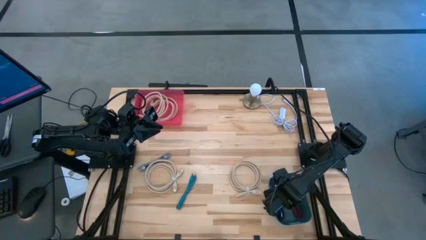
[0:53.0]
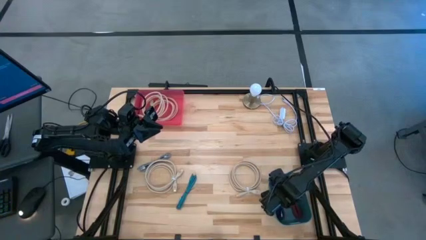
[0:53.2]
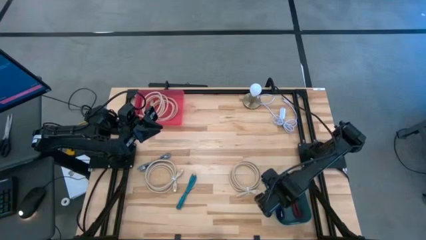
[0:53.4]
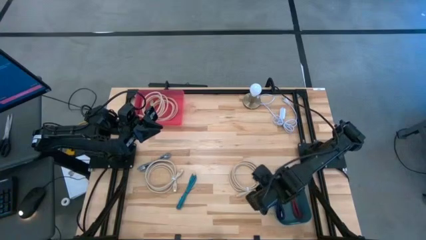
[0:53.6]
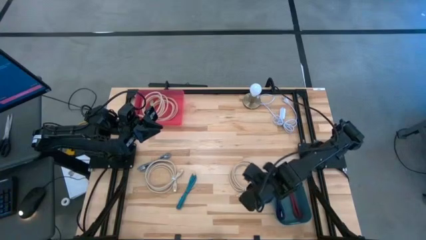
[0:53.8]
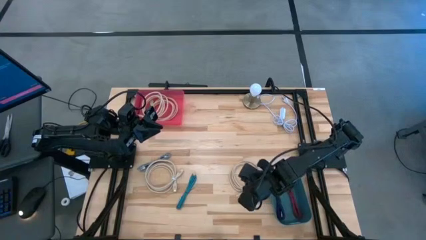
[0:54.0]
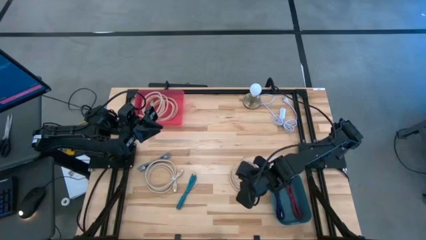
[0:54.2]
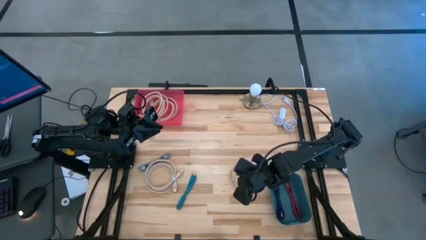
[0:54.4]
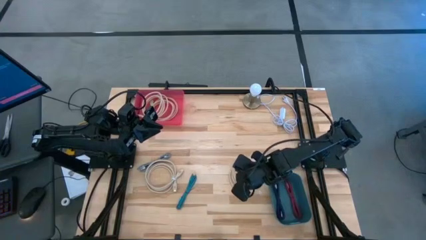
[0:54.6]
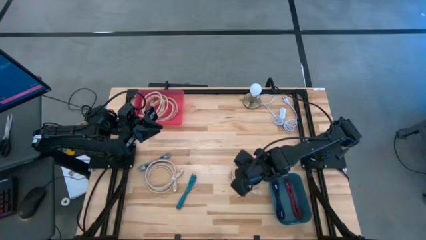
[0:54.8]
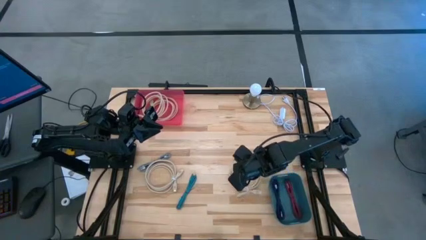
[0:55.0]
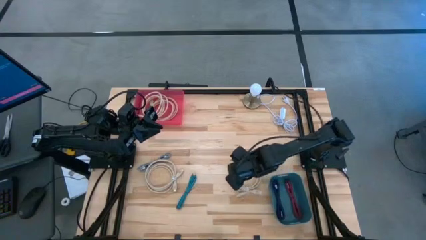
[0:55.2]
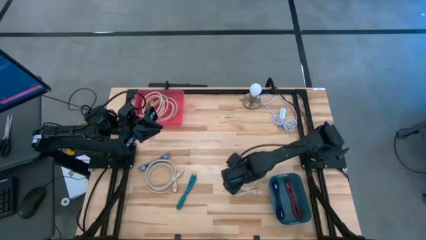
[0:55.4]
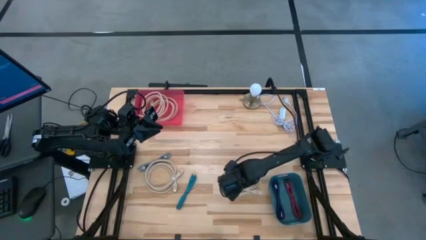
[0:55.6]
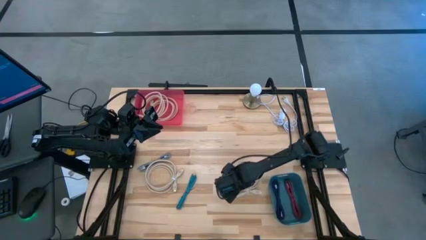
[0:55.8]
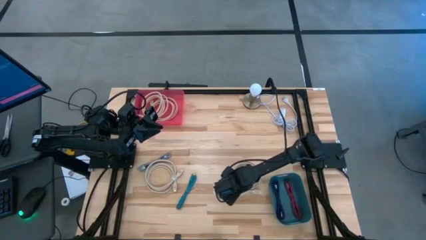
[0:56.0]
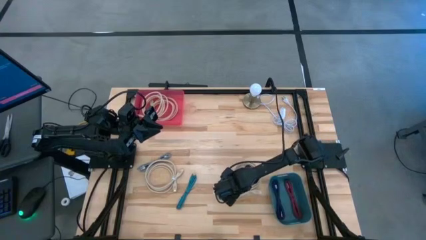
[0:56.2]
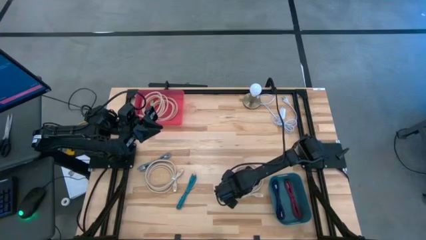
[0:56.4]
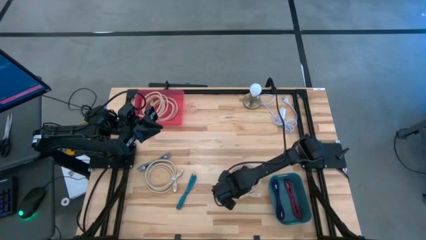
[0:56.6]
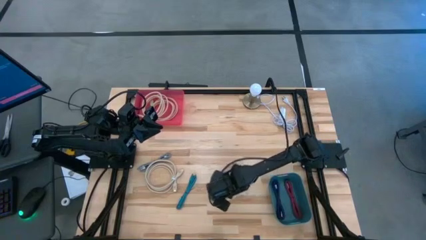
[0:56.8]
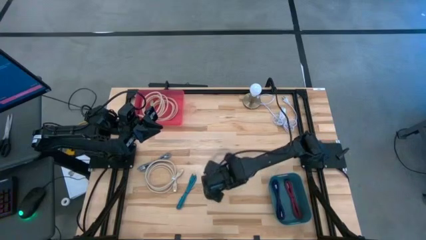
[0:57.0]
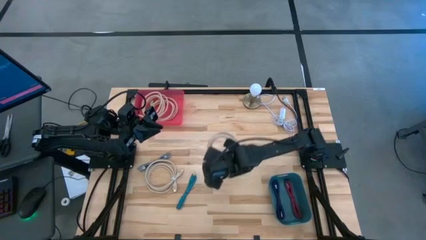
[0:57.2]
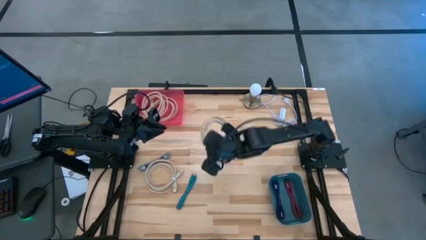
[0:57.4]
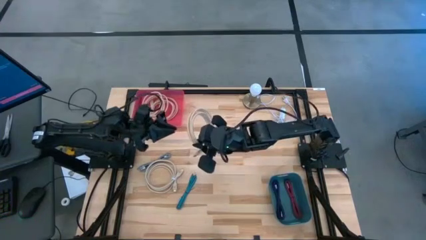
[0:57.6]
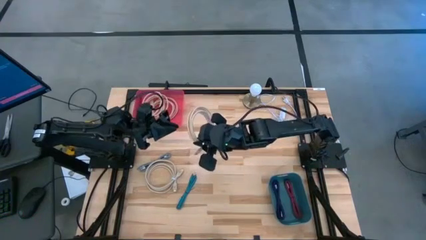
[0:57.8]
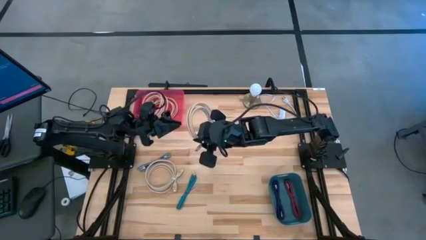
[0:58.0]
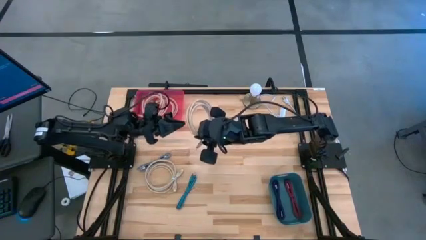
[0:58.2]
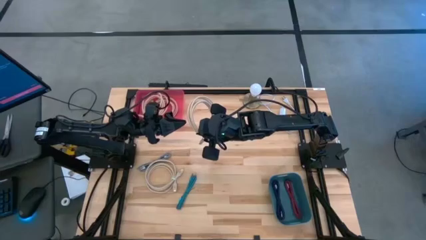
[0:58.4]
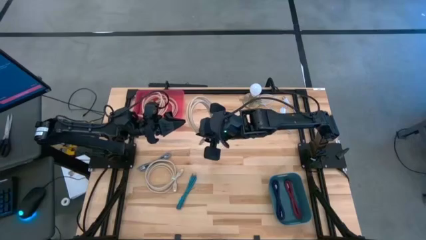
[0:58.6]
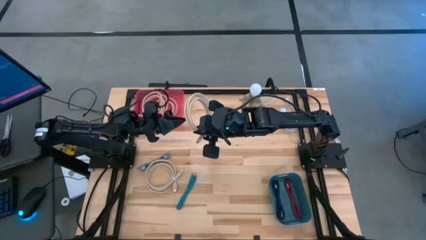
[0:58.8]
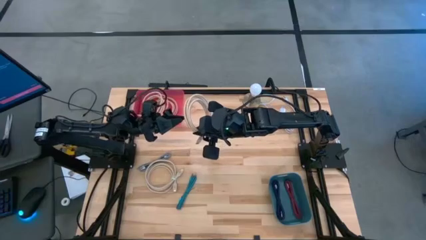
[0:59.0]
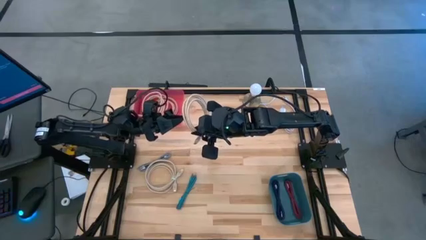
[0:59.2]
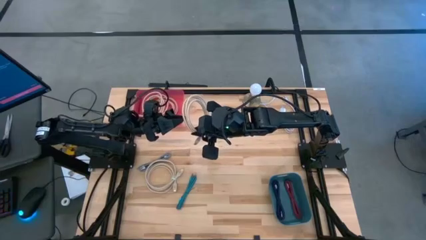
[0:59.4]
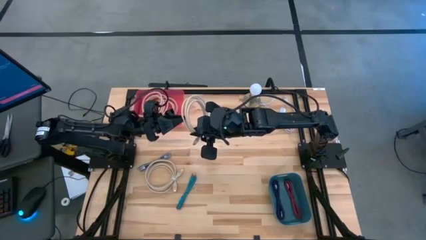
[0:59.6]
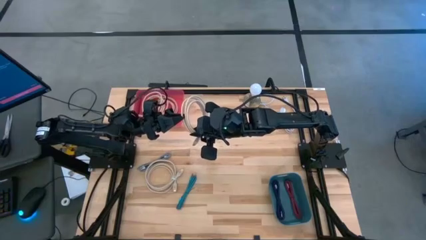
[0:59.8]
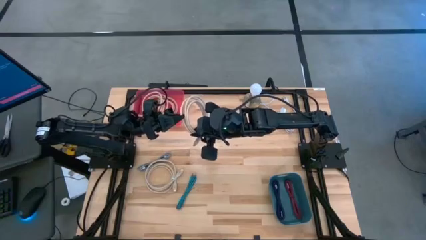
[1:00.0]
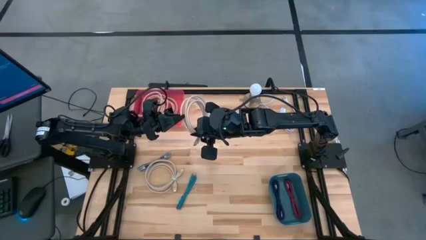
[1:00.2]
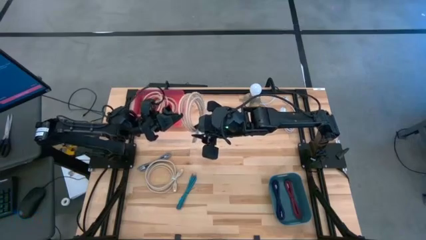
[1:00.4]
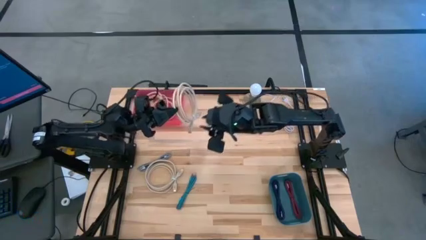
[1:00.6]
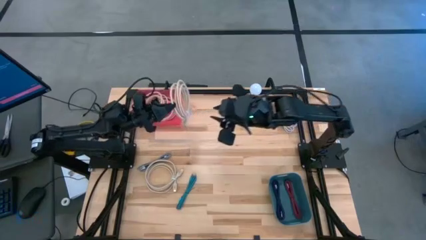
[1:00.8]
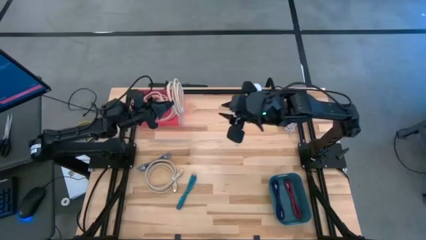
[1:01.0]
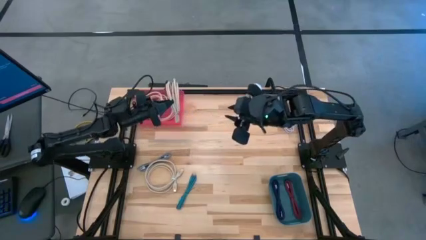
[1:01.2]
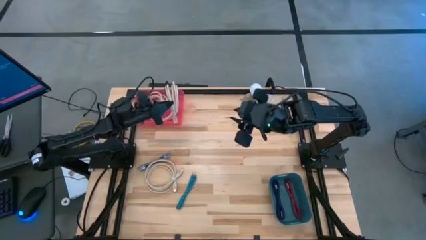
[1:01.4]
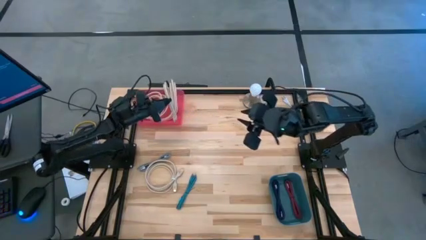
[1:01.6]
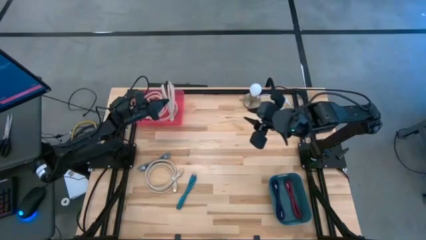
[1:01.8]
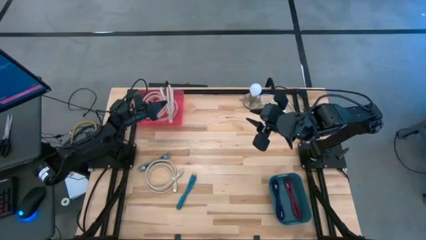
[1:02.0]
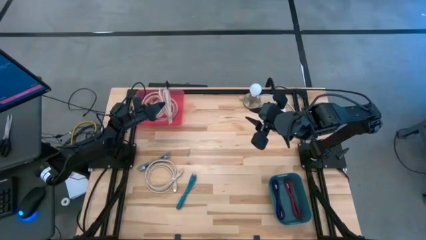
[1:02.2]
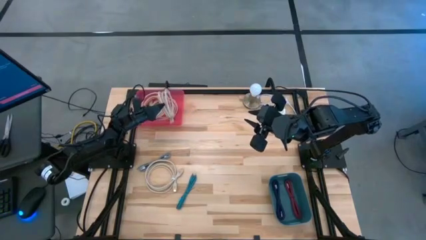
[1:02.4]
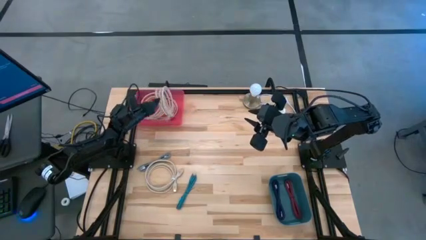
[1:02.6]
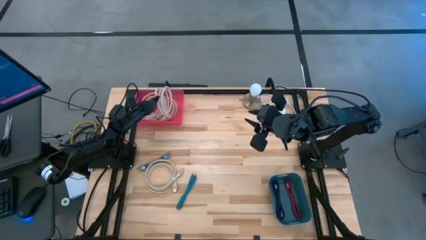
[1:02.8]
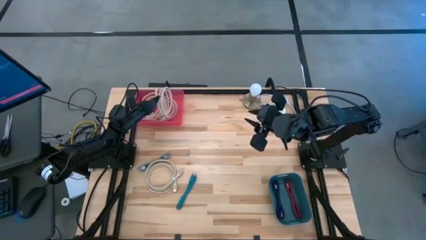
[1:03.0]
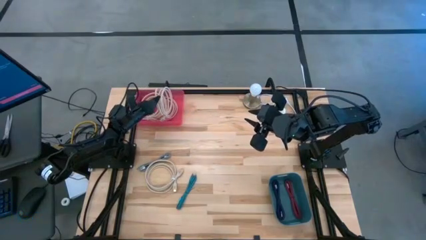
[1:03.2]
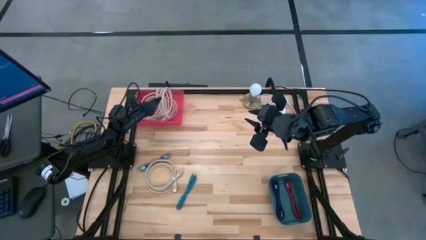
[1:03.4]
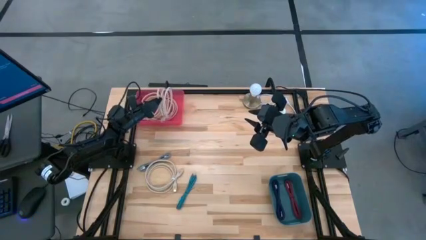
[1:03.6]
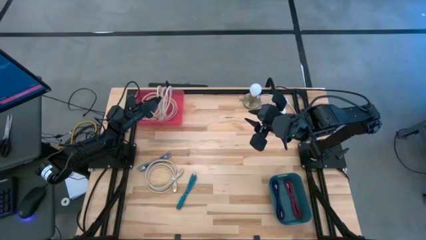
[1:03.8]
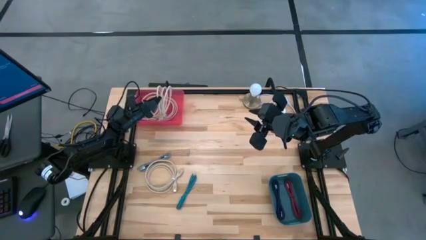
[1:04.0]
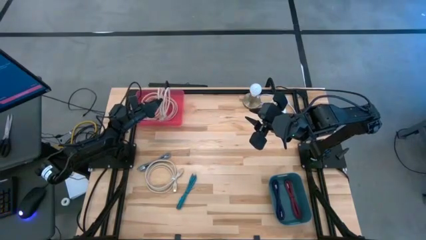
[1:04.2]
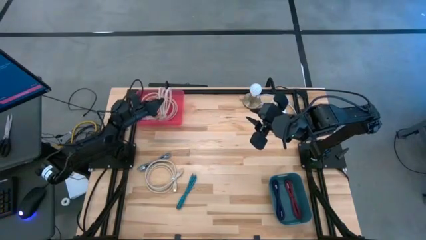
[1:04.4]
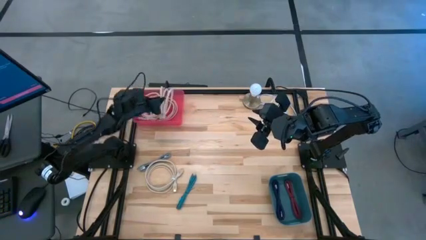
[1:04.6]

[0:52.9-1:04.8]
Task: Pick & Place USB Port
Put the brown USB cable into the red bin

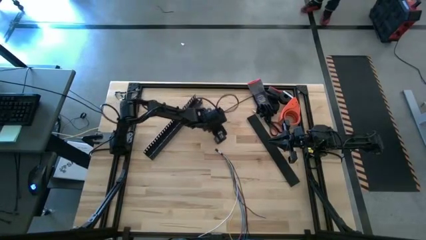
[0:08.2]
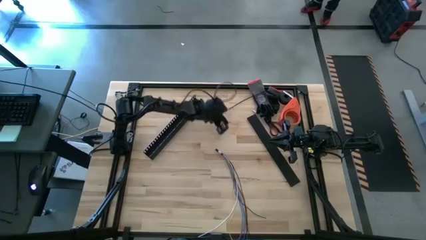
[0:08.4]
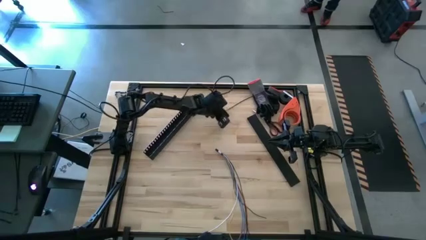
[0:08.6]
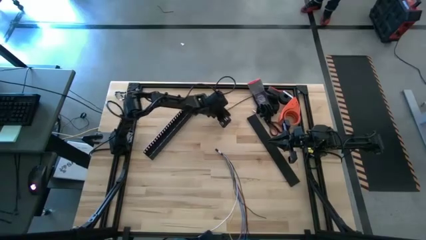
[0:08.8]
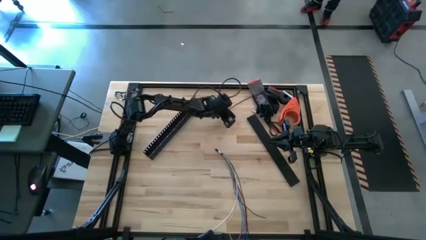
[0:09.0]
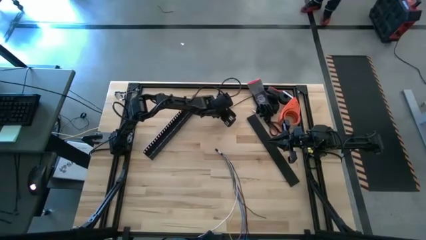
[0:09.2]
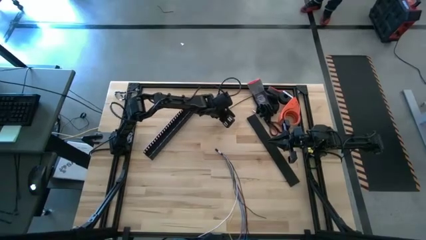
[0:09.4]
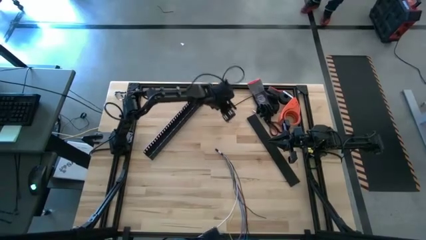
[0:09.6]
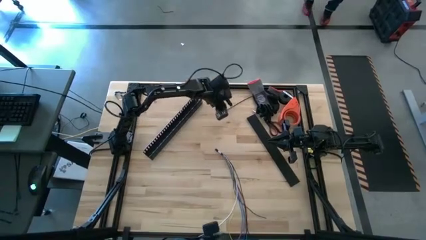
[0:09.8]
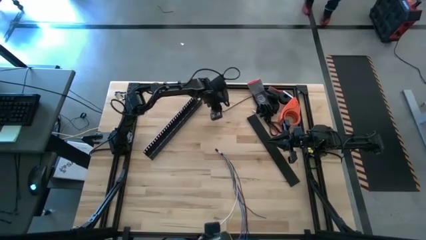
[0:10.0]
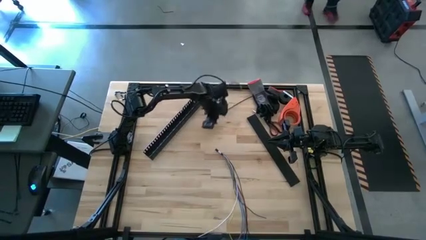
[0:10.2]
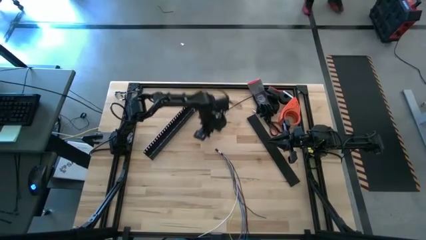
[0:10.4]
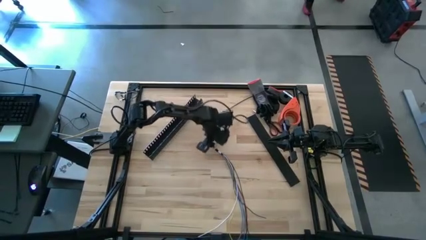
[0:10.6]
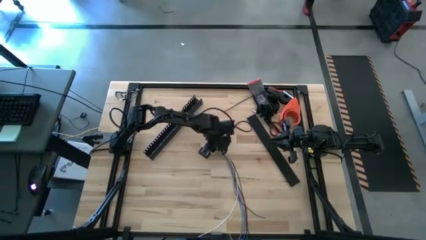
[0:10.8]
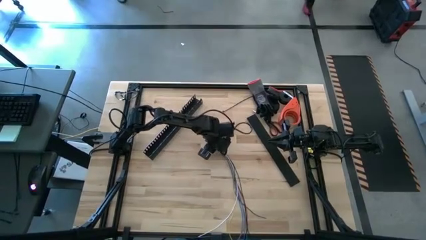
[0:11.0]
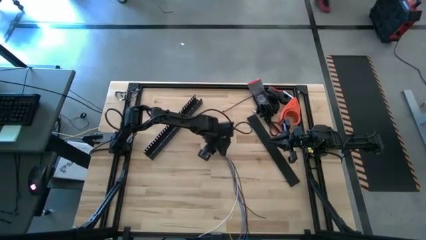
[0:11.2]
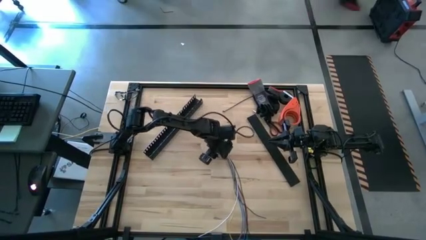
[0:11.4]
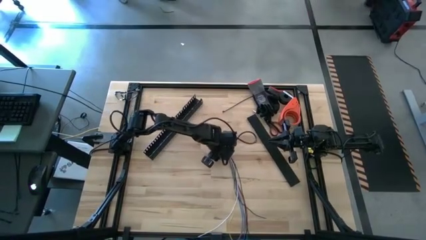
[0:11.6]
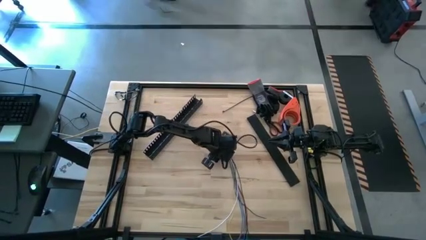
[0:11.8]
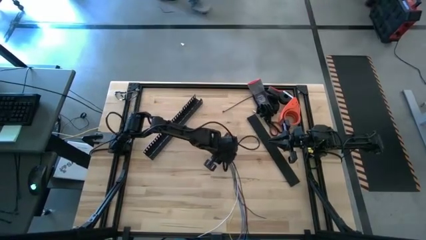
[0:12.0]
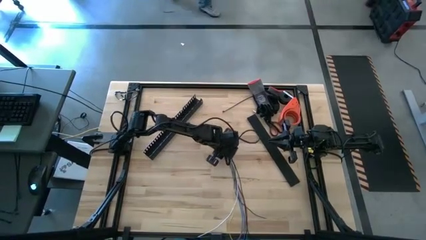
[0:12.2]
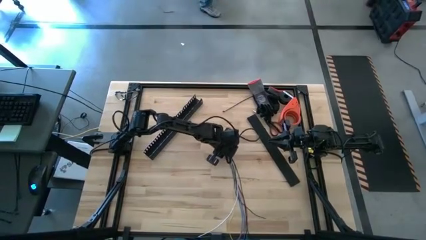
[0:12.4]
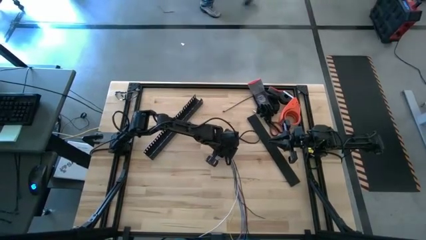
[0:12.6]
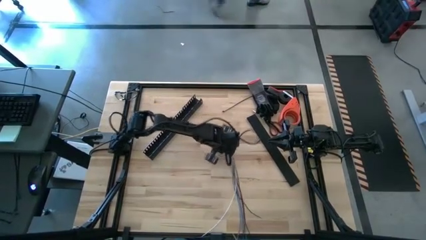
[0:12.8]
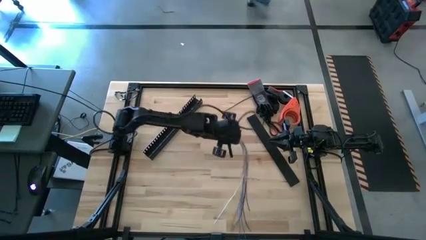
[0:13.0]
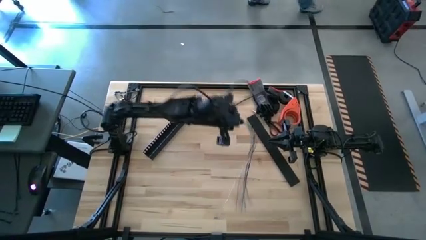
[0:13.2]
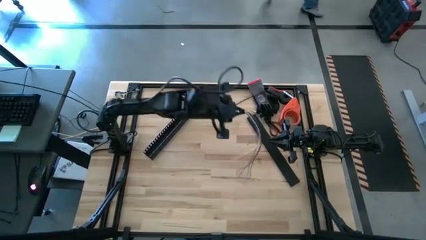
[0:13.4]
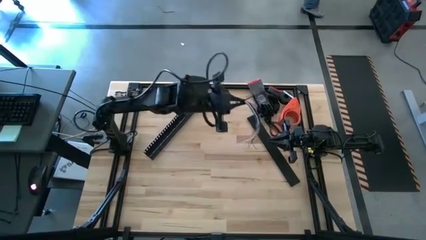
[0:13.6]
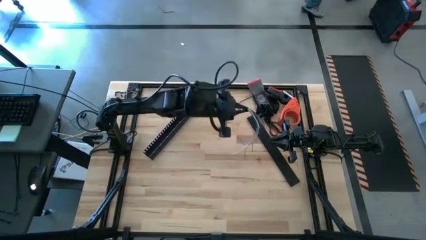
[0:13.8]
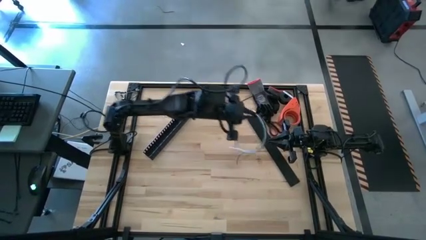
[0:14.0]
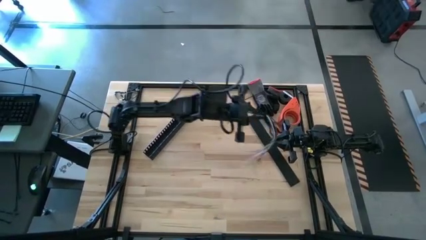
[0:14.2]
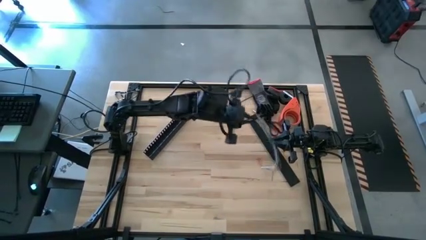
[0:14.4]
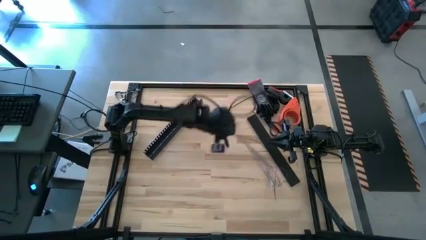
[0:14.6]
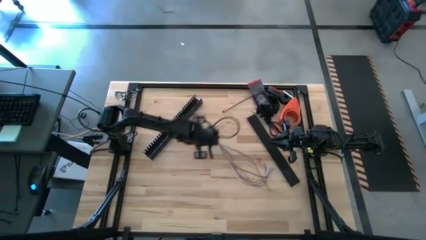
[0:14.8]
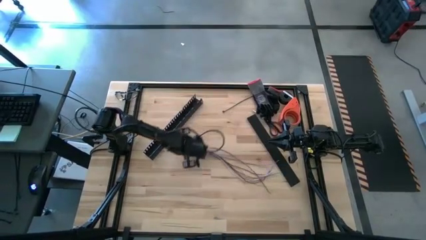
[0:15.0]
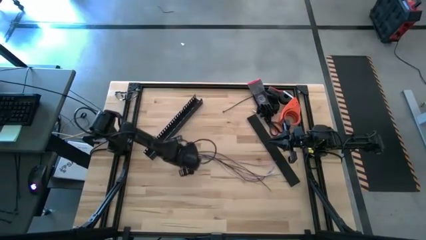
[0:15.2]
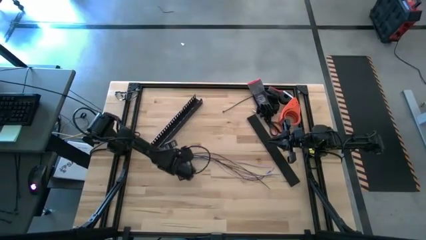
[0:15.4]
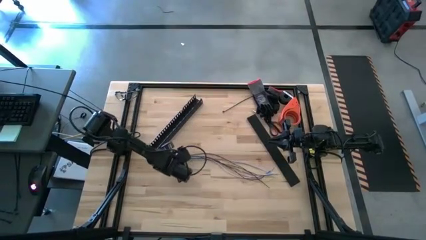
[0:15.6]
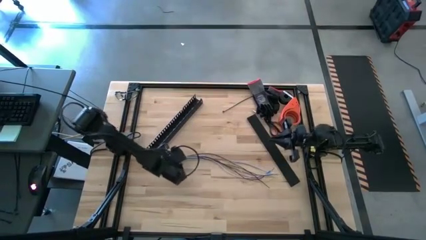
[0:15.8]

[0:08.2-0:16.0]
Task: Ziptie cables
Prepare the cables on the table
